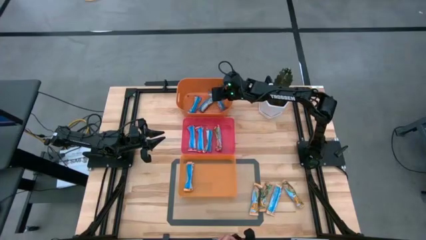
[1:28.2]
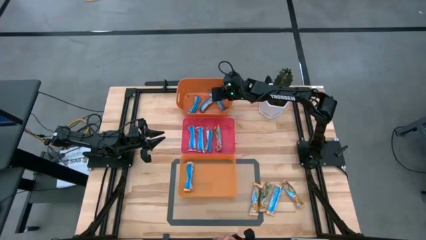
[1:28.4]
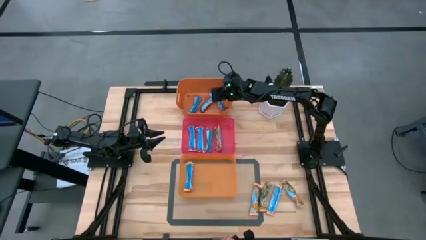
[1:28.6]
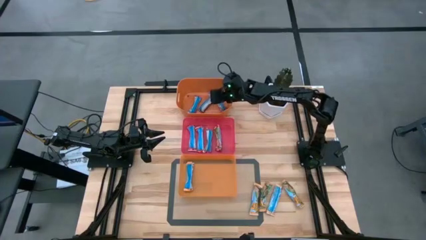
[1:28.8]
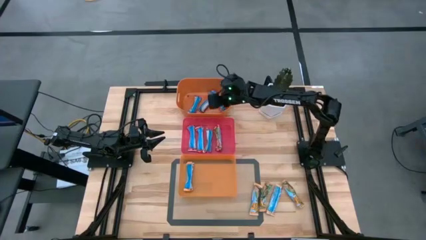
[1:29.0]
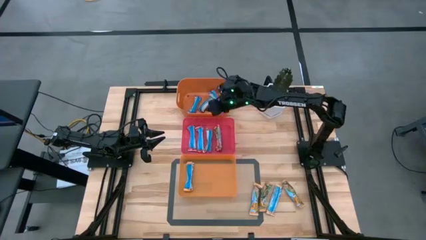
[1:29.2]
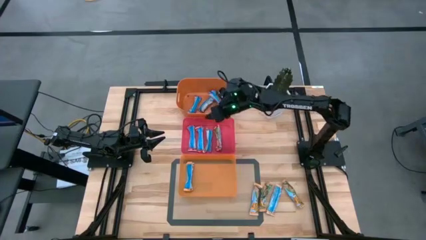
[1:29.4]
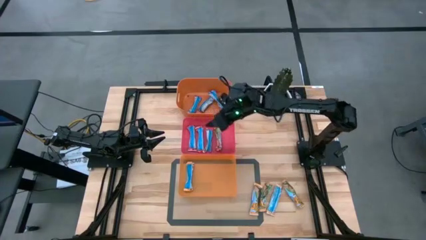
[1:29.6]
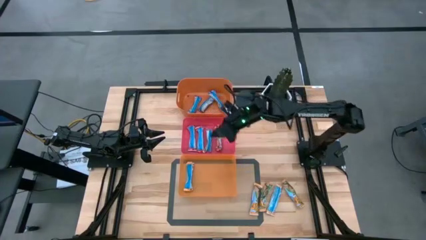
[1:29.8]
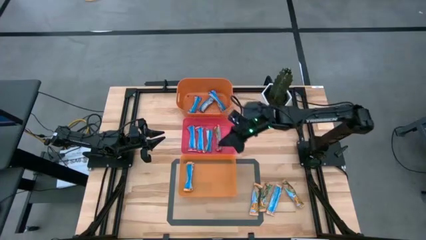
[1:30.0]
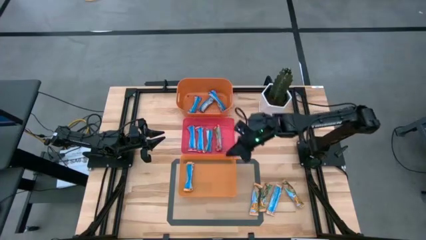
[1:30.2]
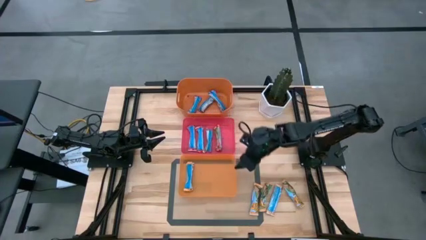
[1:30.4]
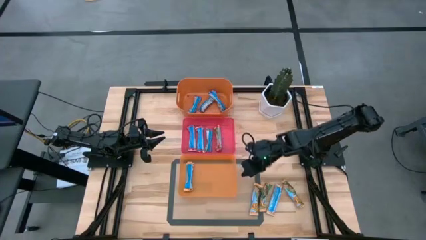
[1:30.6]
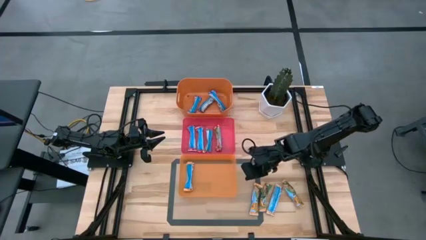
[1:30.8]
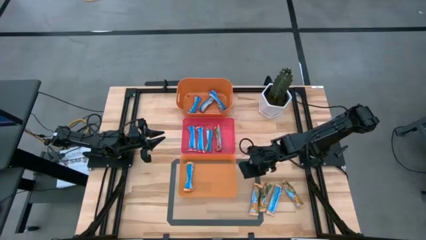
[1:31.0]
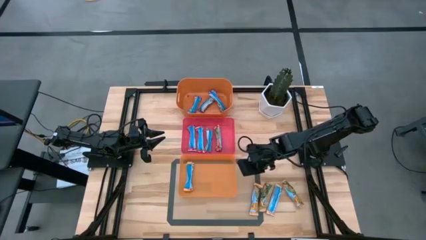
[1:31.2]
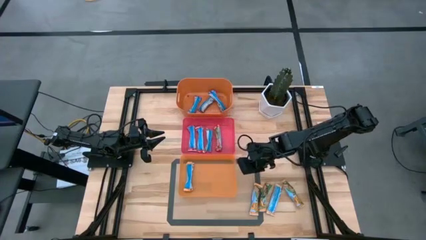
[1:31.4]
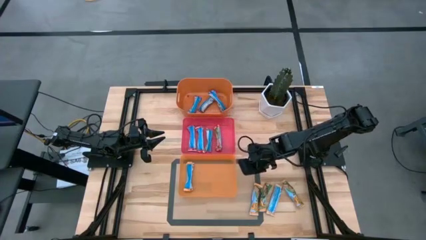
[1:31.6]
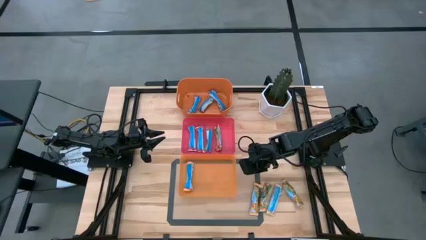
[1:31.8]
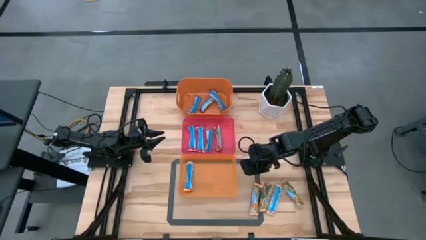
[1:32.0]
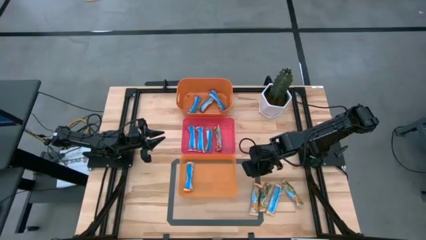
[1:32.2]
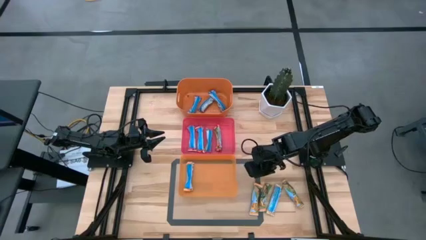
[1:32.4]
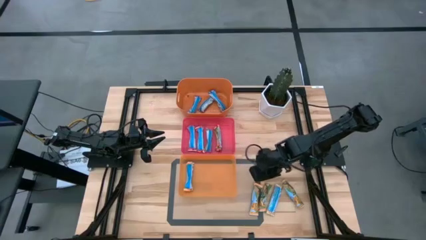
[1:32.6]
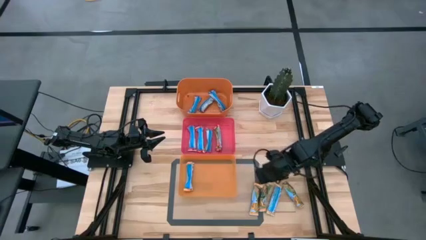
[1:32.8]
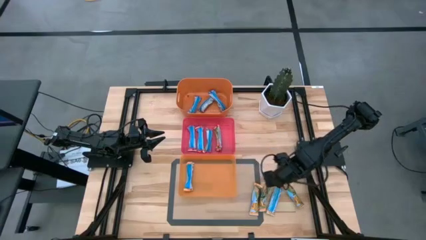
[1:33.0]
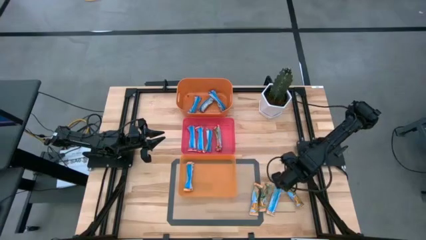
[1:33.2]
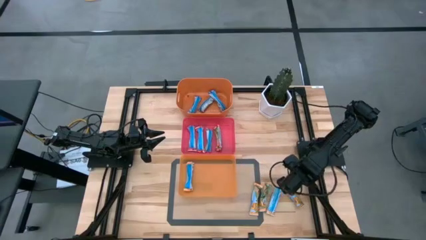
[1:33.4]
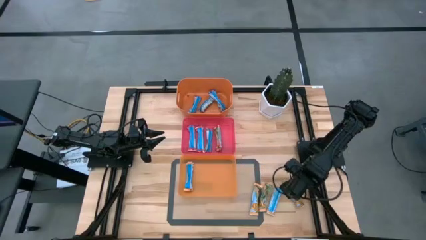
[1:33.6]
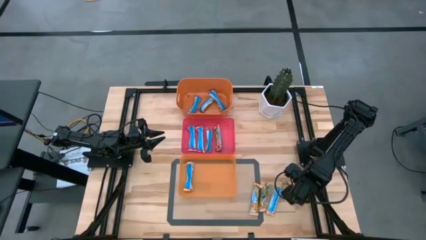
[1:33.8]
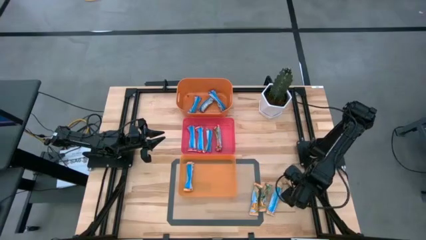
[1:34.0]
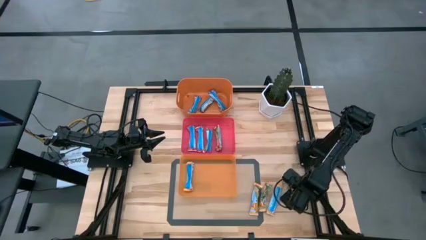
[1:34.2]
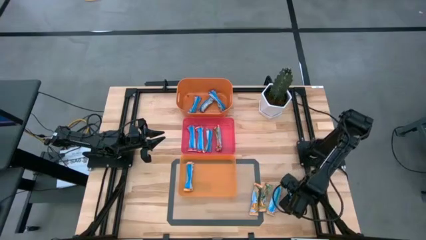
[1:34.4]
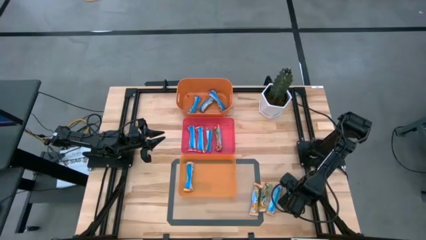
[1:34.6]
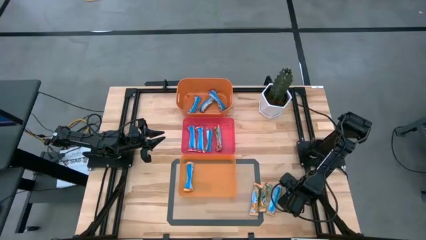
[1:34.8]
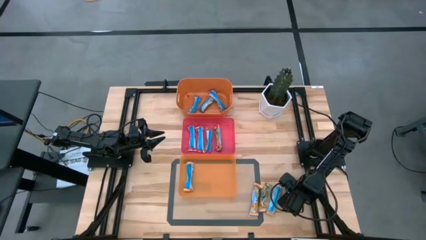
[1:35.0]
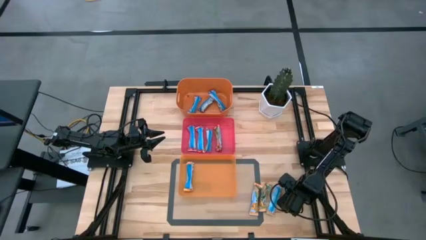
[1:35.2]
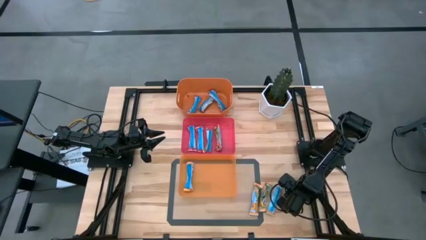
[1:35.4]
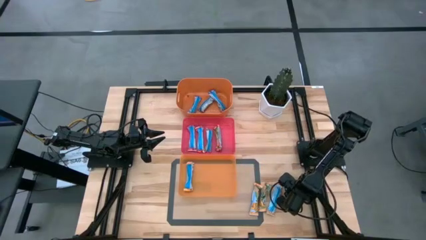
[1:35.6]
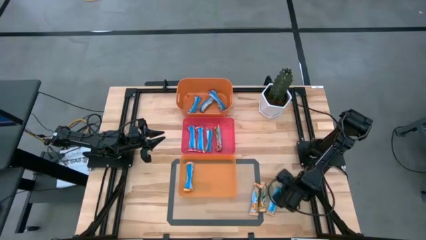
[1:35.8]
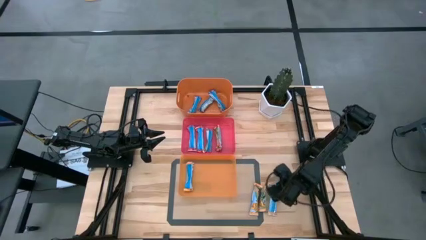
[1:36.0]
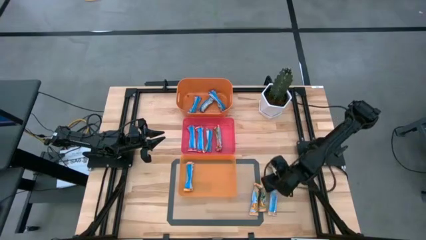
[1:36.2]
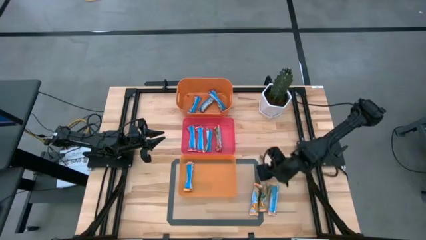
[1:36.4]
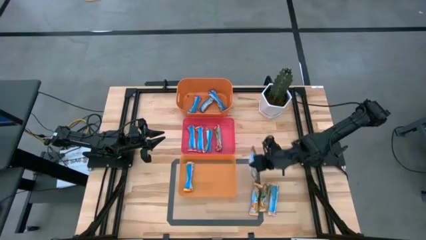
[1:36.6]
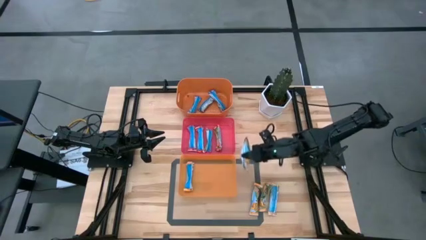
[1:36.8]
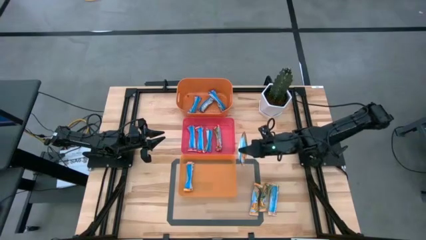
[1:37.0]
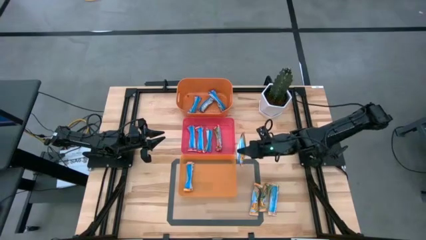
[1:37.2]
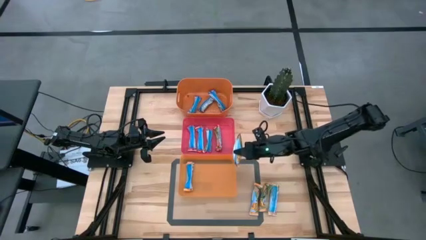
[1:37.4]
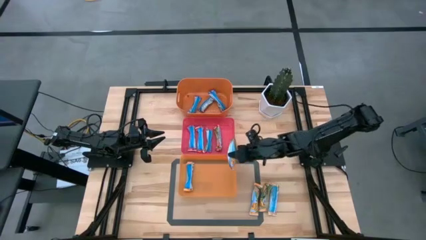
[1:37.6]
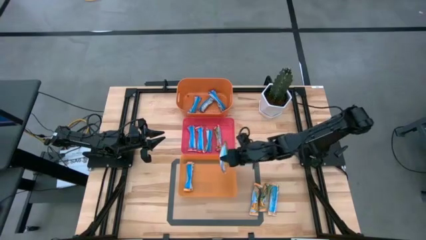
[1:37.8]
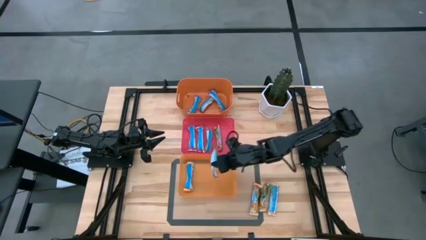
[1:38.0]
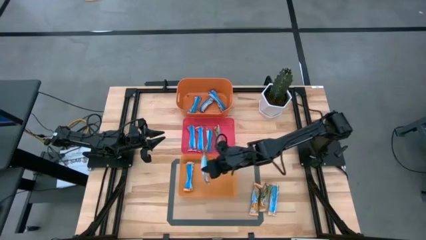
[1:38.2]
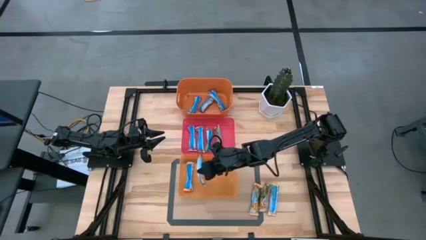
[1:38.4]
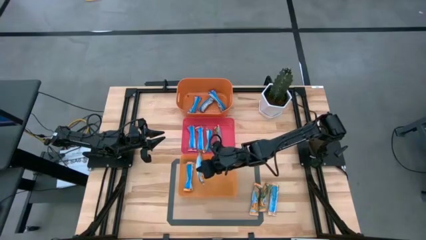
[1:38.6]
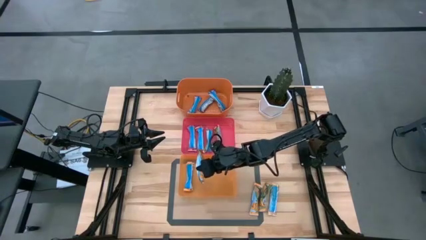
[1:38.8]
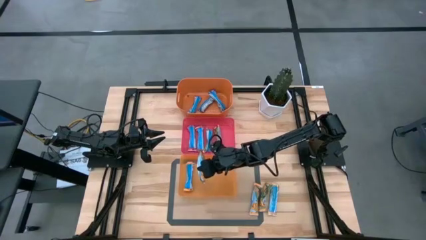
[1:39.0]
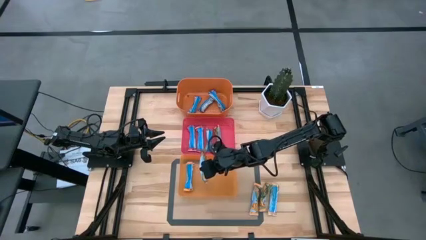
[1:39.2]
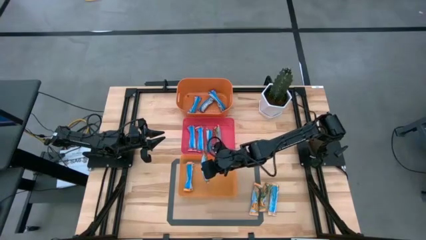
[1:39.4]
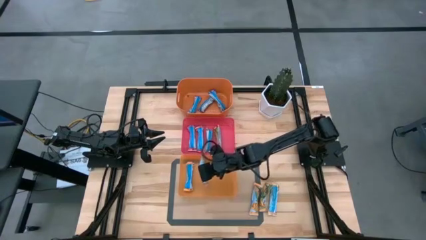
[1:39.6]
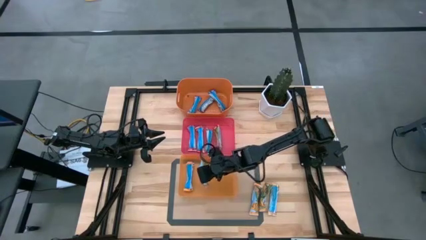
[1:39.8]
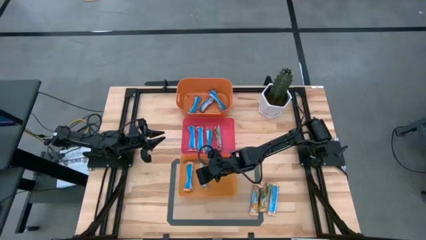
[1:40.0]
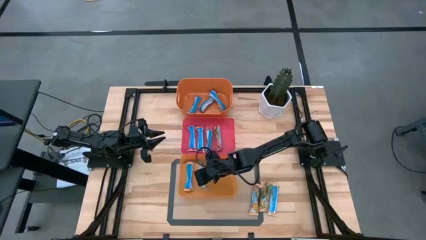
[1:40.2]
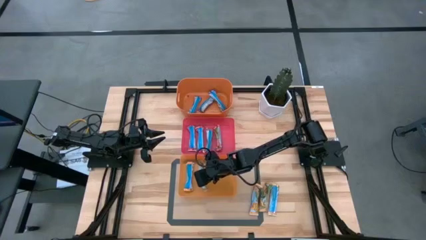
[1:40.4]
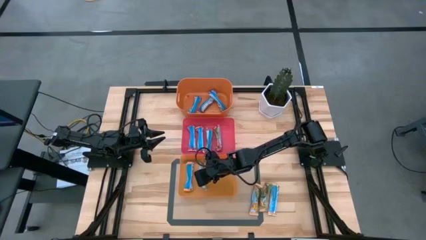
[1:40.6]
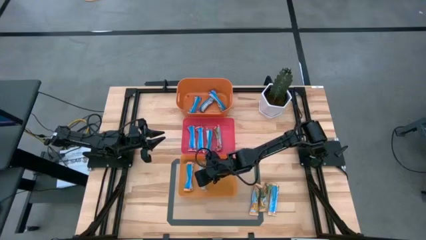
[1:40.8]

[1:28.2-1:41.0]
Task: Pick and place Granola Bars by type
Put the yellow granola bar into the bottom orange bin

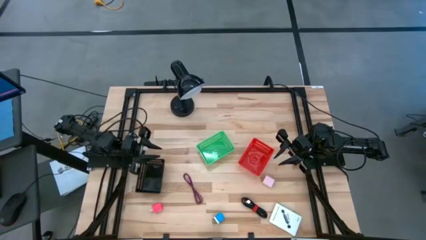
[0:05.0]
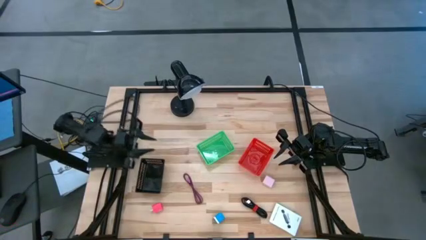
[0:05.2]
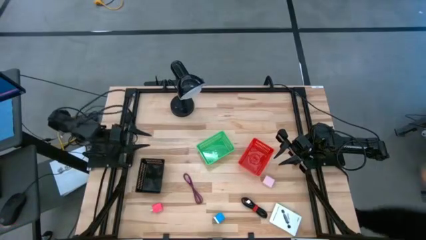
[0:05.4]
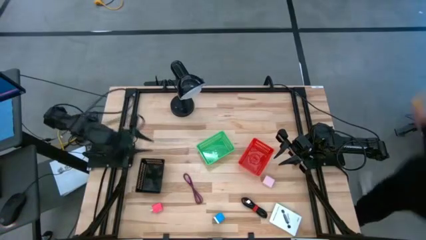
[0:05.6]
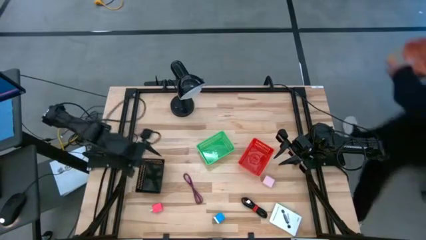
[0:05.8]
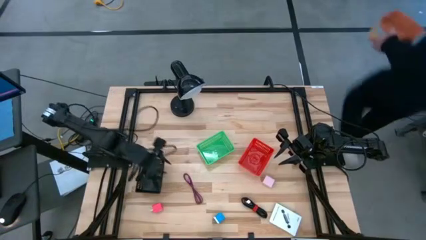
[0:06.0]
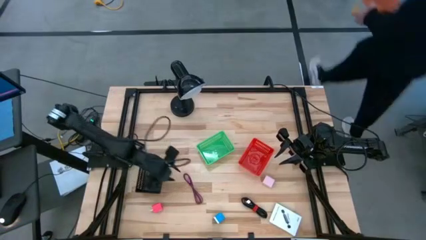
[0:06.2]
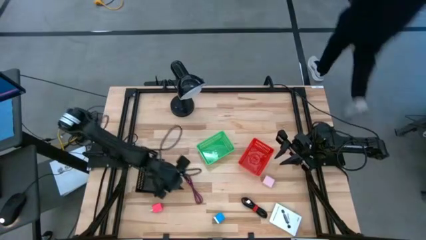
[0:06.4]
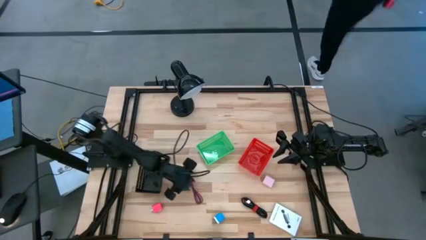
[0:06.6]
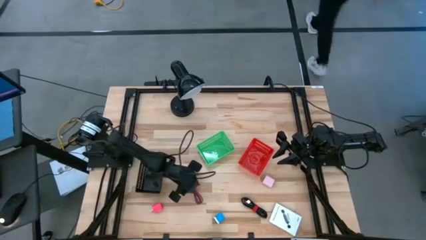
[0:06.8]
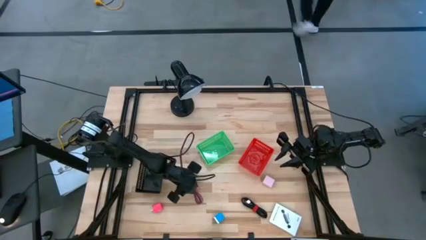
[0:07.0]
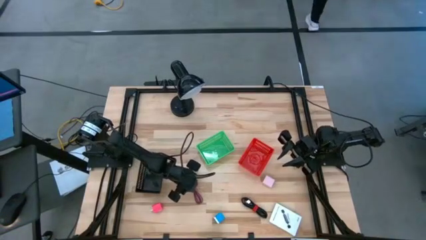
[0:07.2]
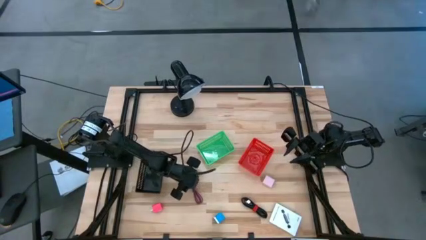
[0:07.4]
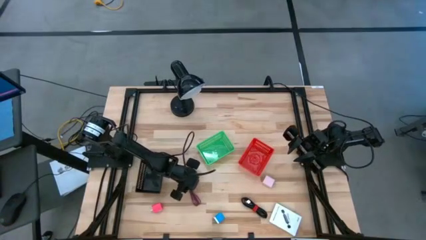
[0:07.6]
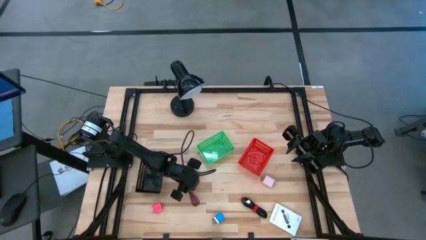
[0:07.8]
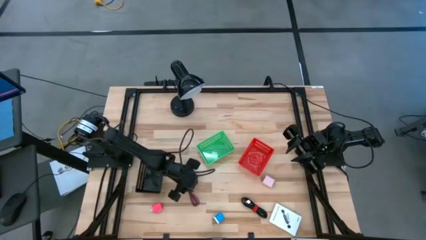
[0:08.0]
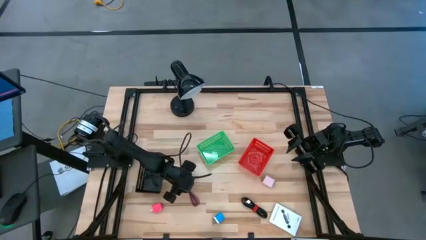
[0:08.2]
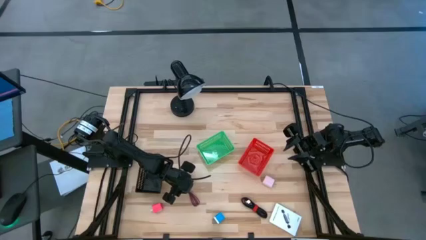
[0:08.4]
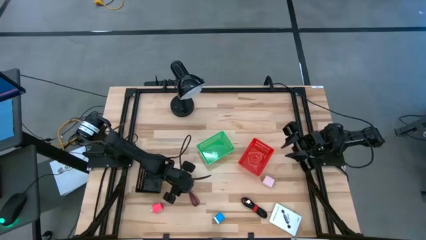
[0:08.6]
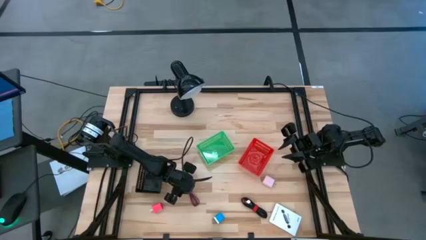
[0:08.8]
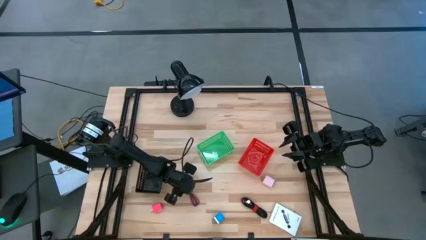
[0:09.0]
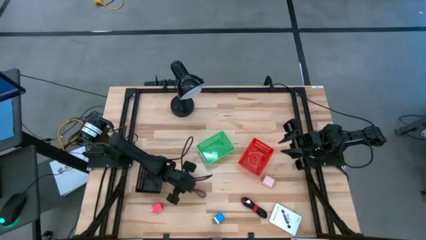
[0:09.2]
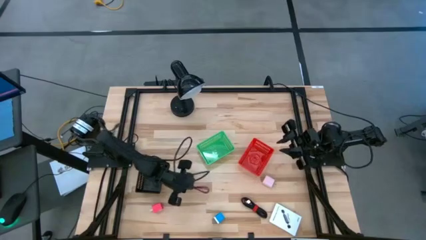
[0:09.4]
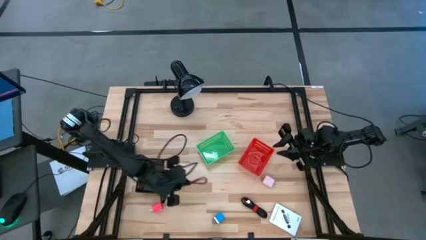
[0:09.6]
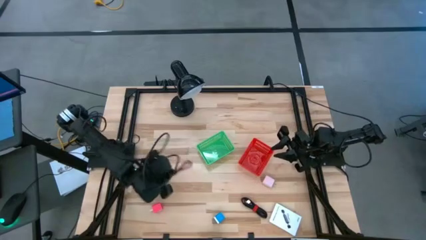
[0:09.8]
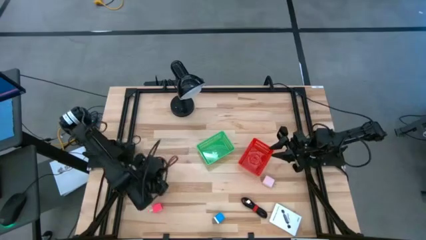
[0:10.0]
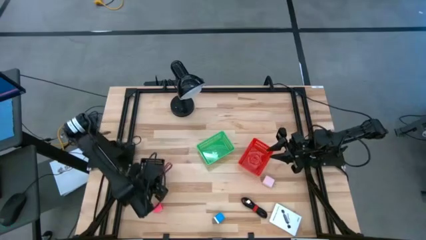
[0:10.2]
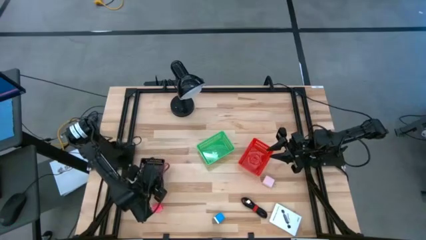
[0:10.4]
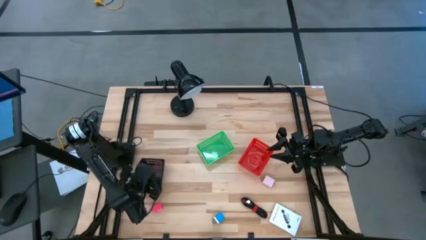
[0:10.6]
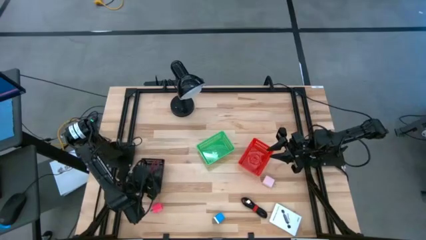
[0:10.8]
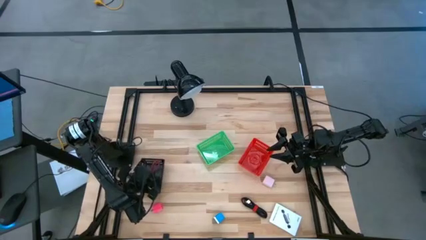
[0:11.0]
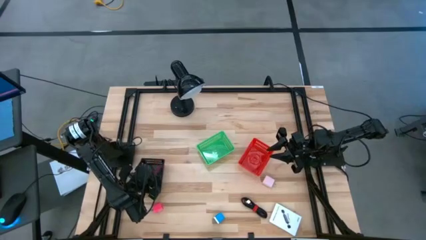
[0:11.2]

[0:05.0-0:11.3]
Task: Pick and place items into bin
Put the pink charger cable into the black bin
